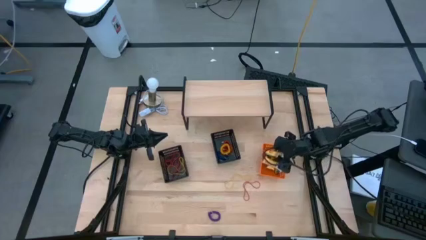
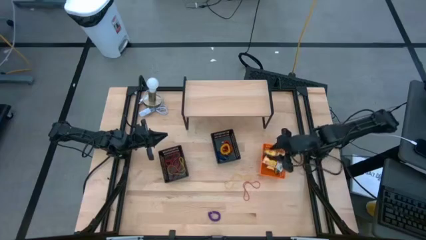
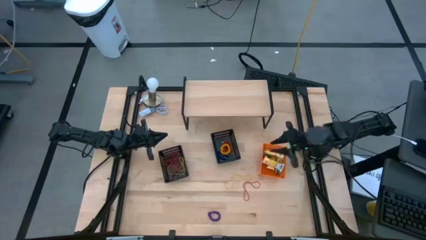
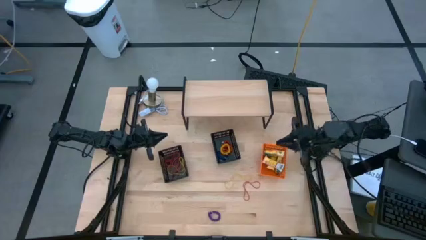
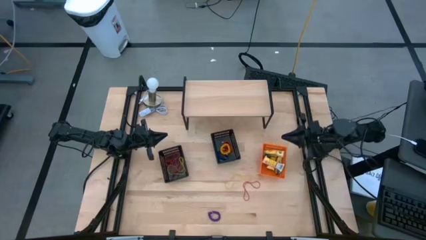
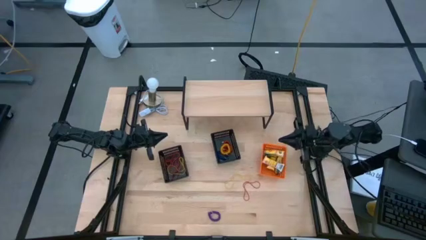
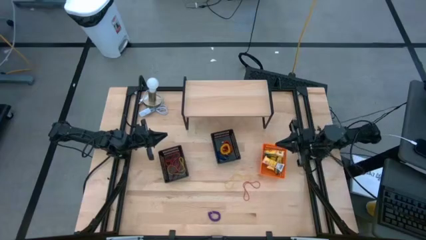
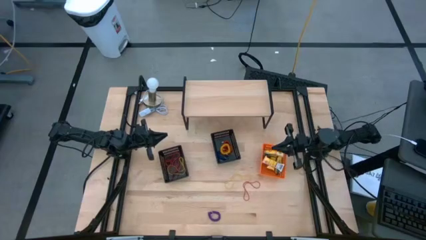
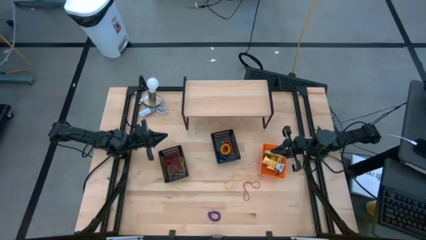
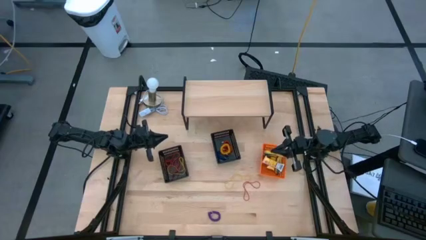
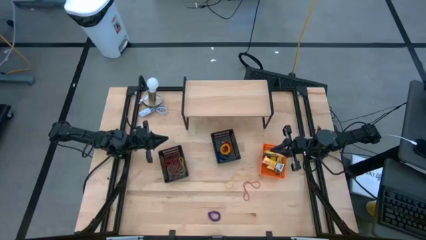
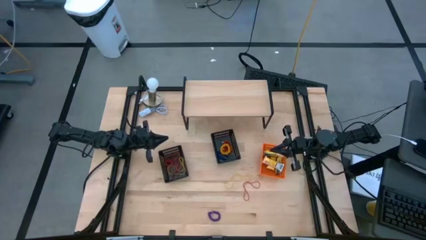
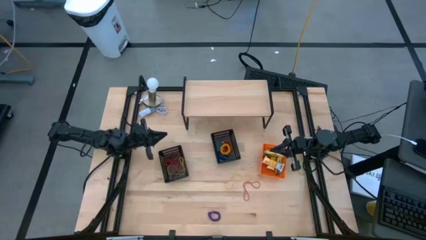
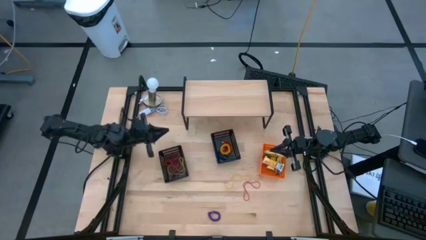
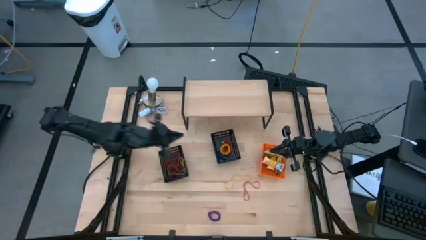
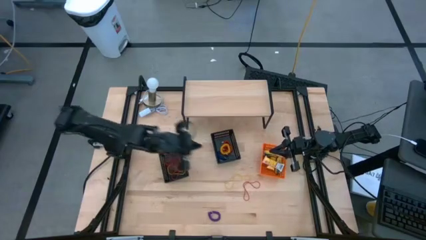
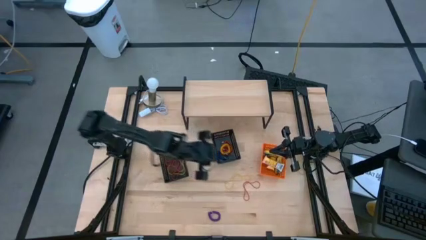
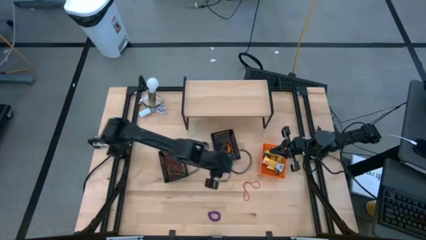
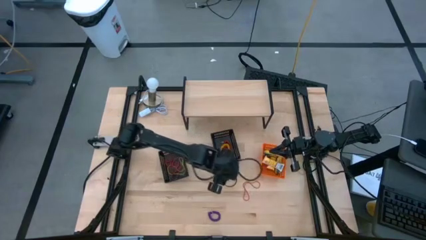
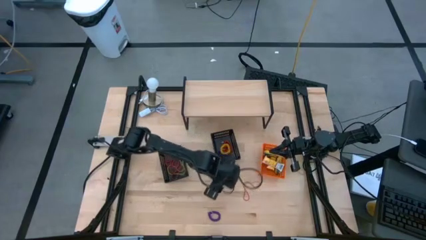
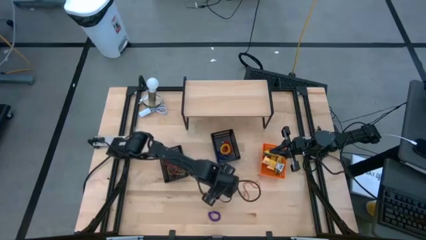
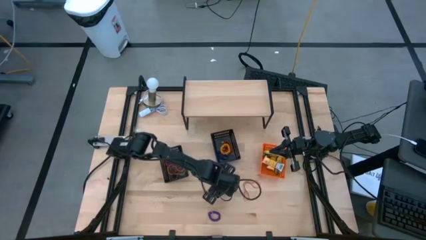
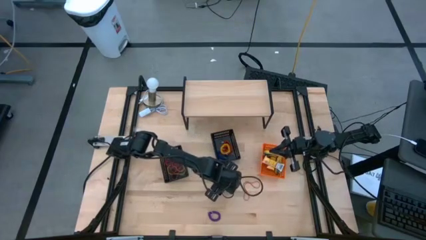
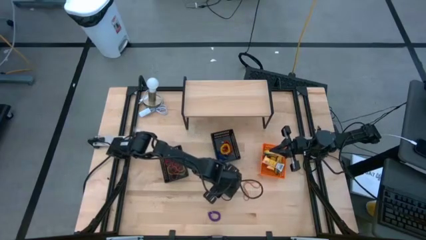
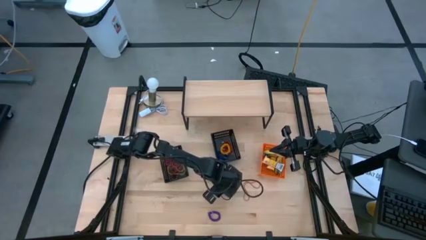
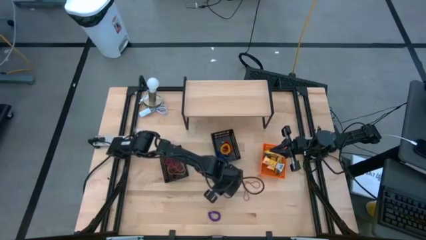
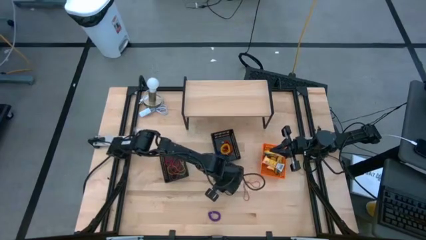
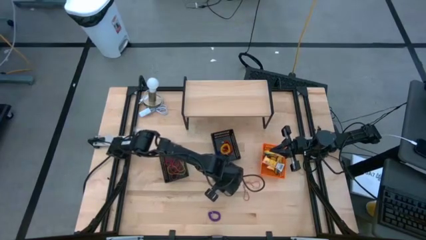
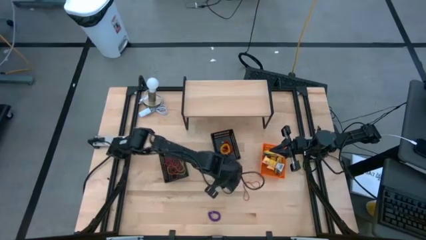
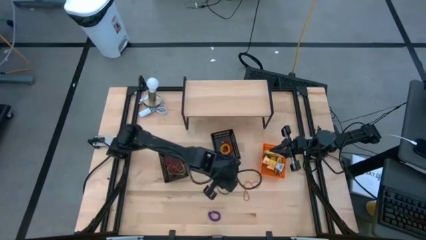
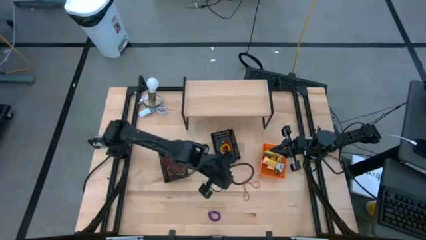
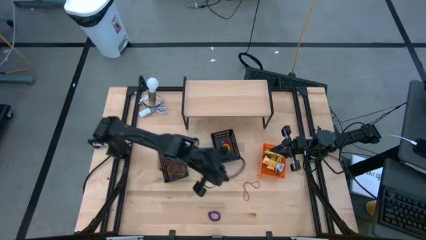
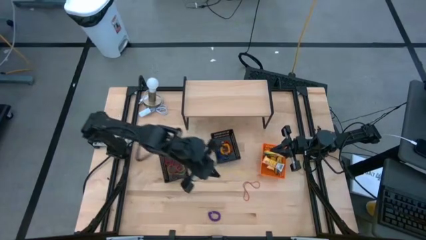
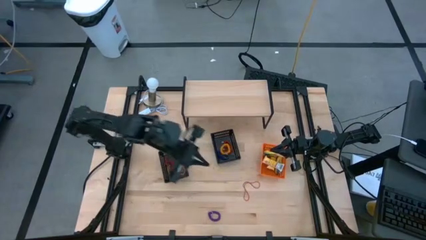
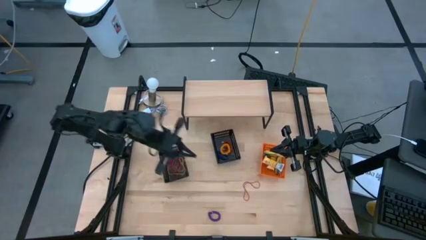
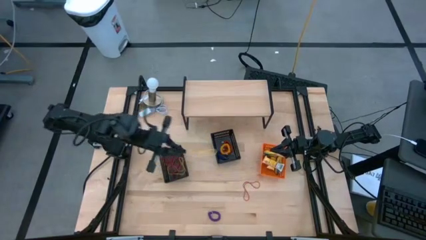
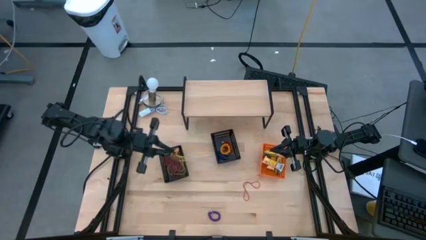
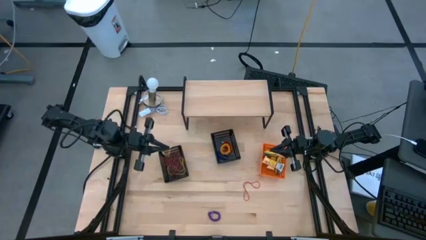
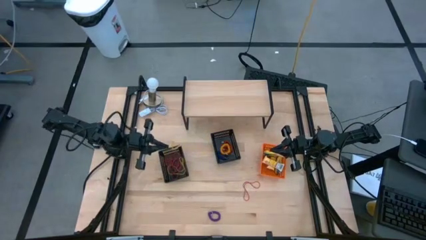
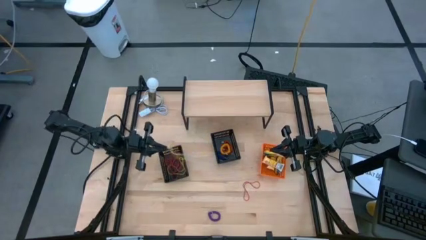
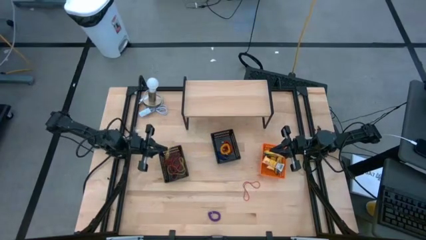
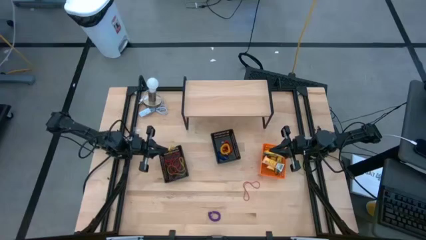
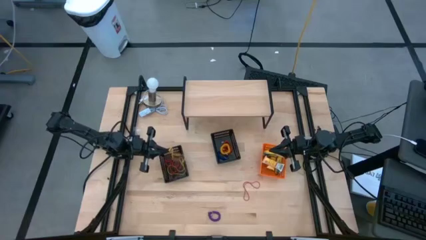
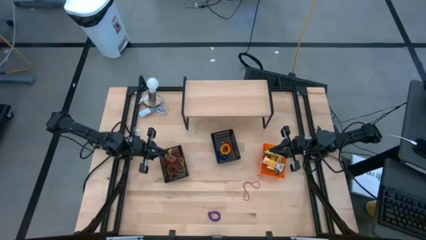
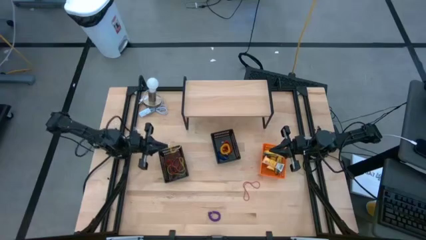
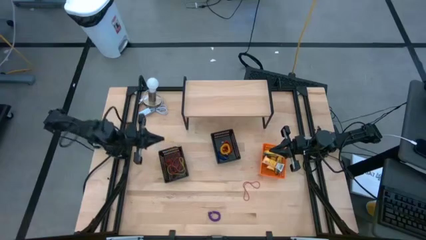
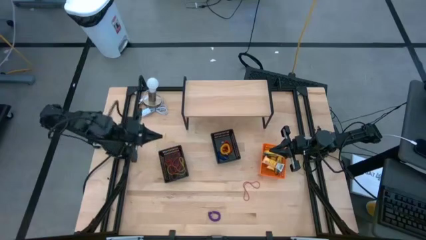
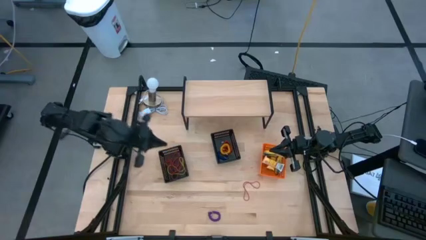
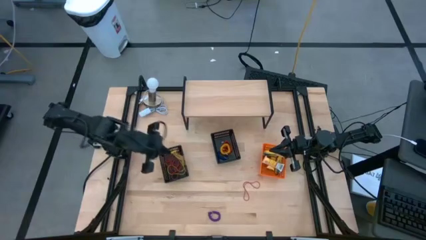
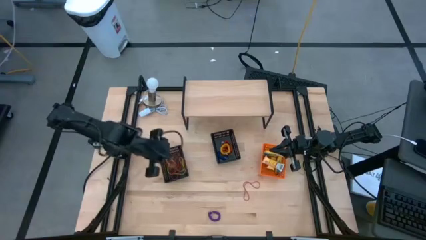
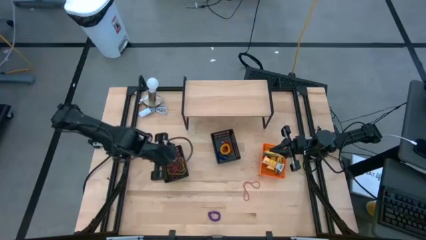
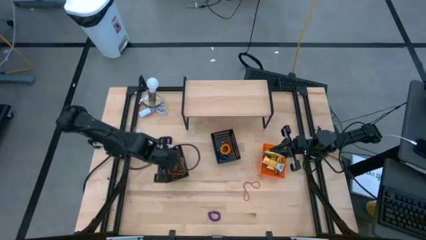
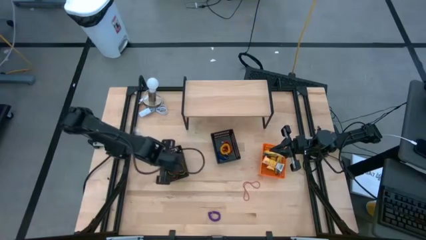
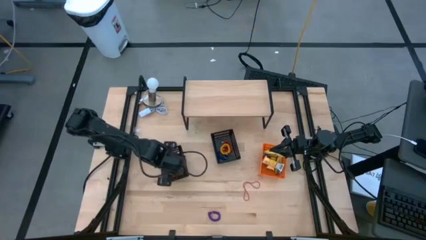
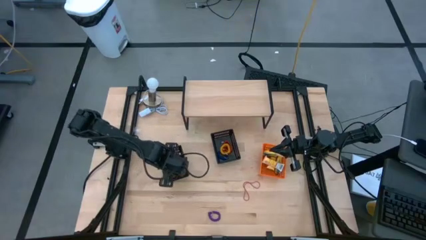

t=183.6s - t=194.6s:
Task: Pick & Place Office Desk Supplies
Put the yellow rubber band into the left black bin
